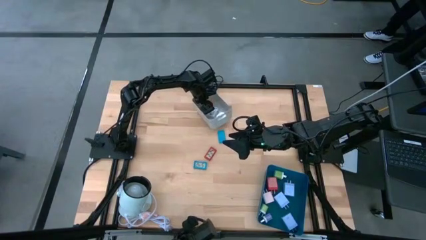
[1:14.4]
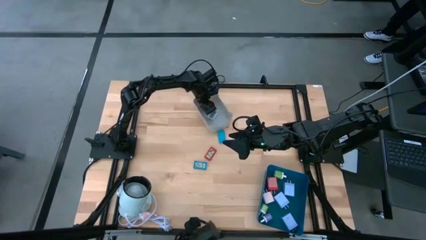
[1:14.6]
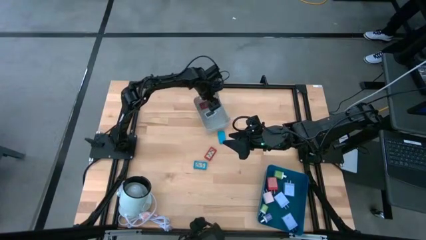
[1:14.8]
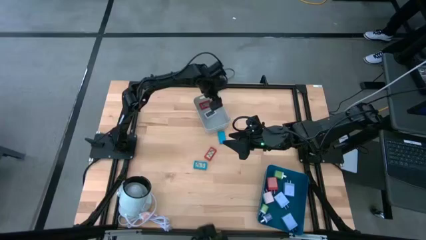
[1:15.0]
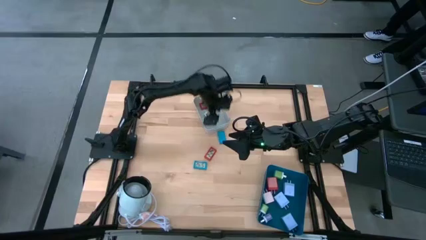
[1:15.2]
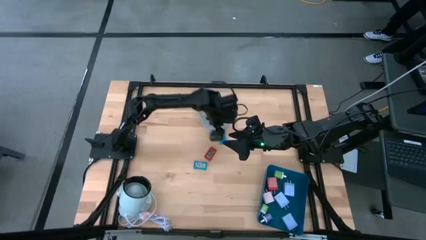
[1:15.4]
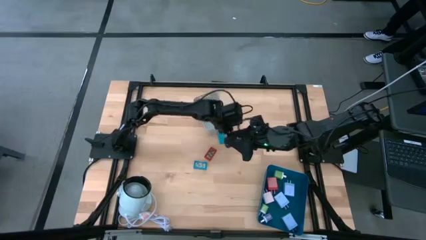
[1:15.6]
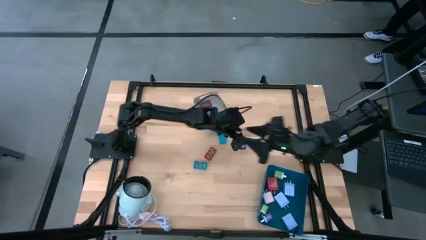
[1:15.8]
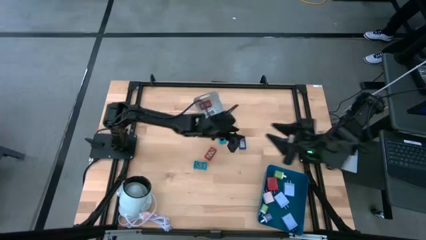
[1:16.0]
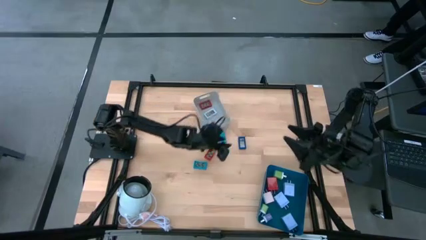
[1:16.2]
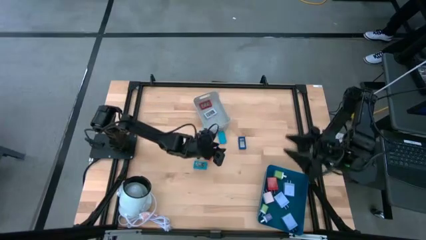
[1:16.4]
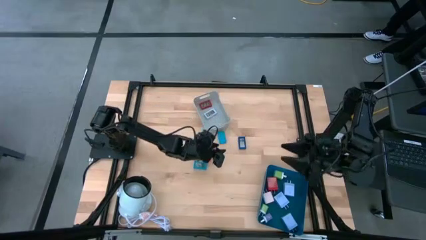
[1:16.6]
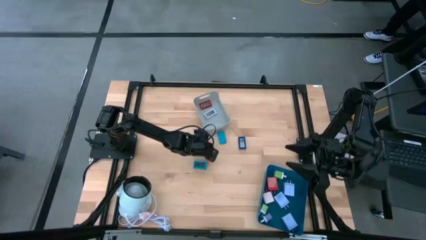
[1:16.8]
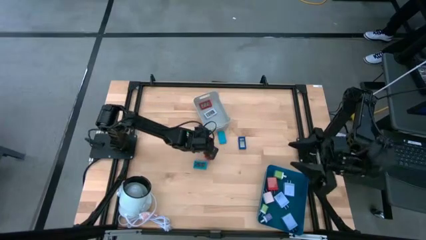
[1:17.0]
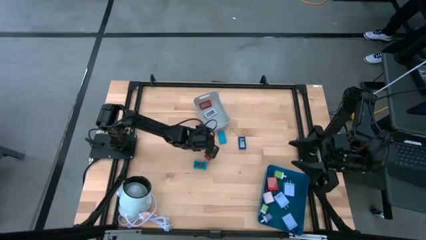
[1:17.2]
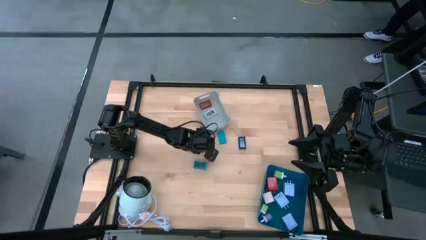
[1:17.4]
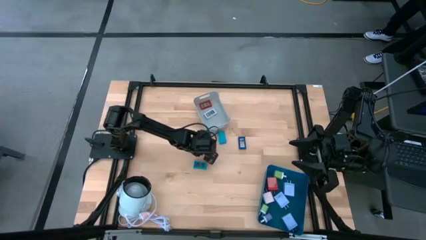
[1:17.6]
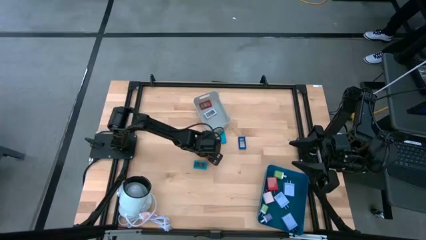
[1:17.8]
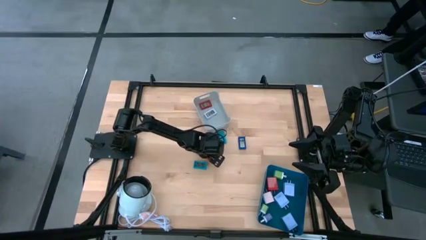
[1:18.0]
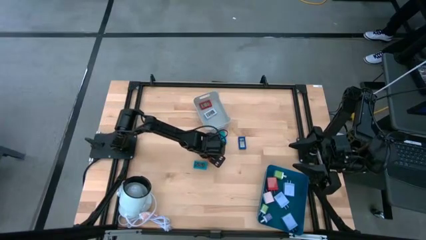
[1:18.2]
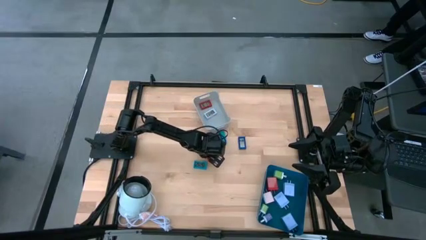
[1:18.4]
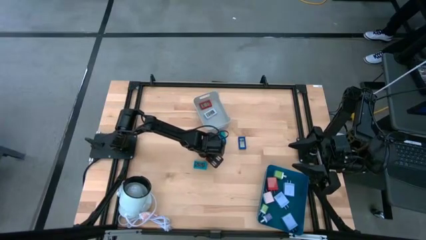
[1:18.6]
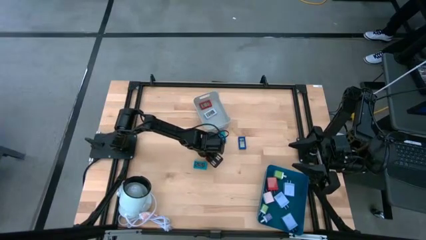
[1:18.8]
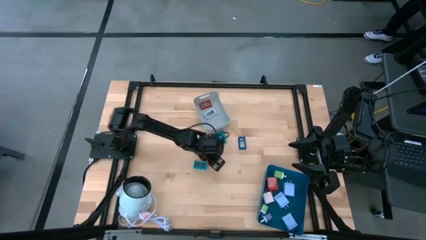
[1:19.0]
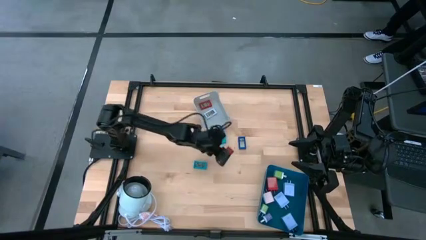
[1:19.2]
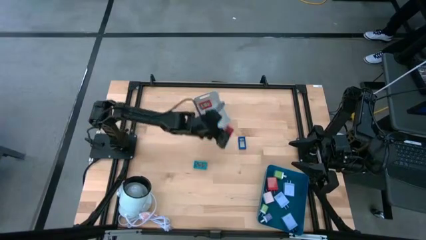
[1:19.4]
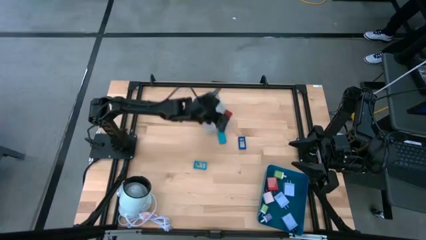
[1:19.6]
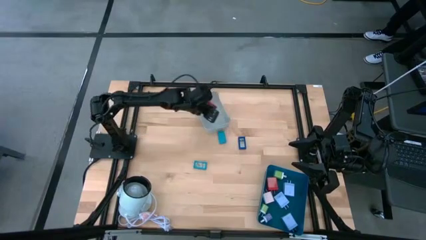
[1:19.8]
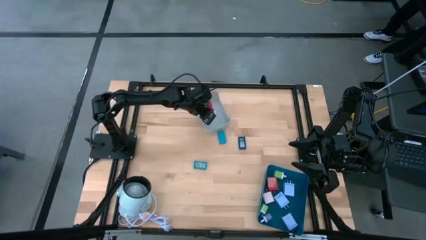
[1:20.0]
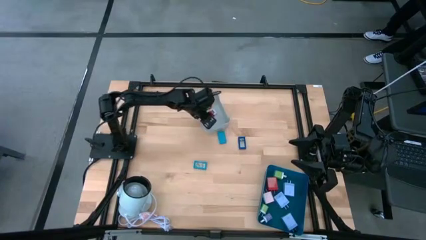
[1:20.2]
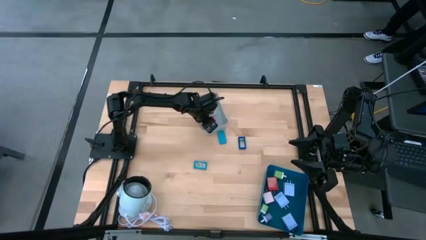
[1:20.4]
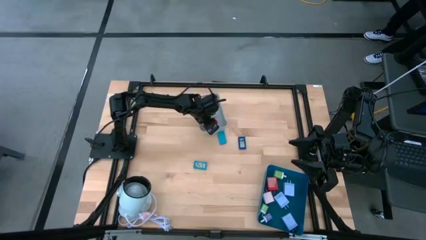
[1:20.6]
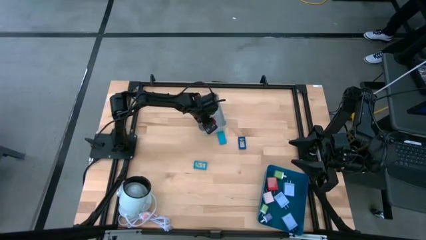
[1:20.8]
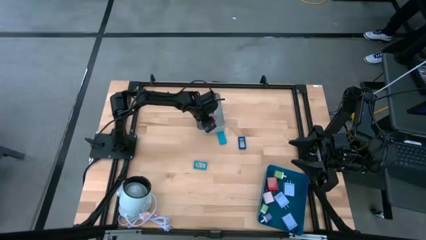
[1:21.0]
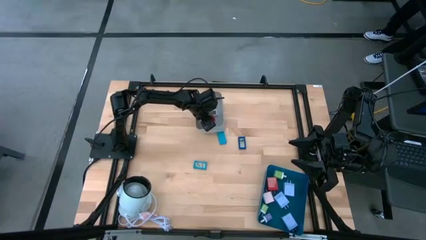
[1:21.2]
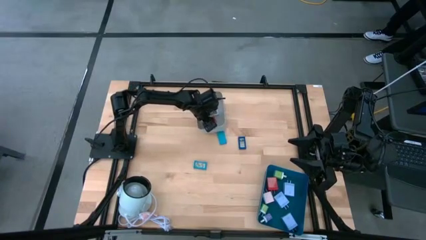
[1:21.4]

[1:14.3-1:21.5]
Task: Pick & Place Office items
Put the red digital clock into the gray bin

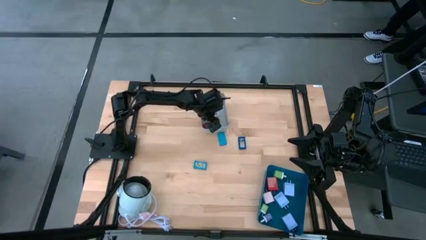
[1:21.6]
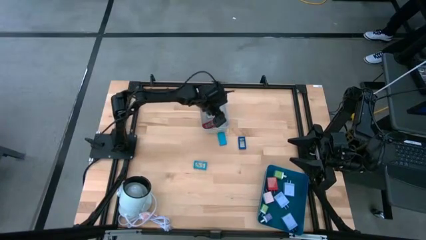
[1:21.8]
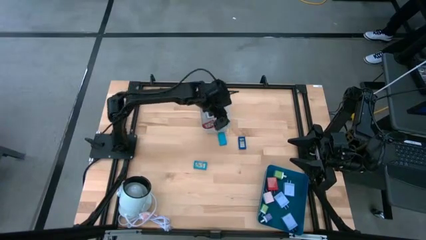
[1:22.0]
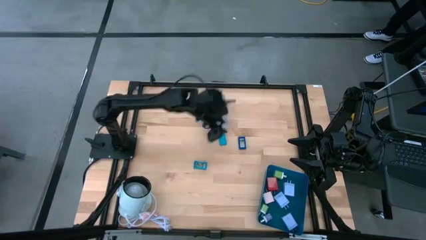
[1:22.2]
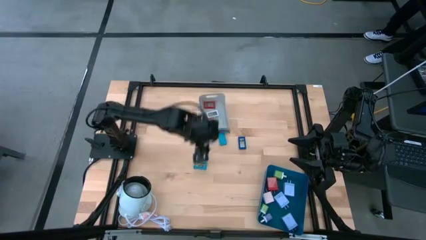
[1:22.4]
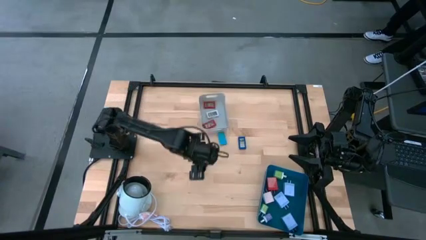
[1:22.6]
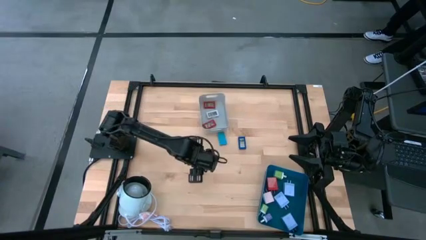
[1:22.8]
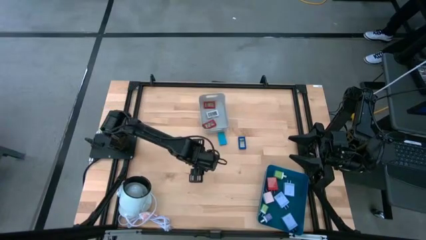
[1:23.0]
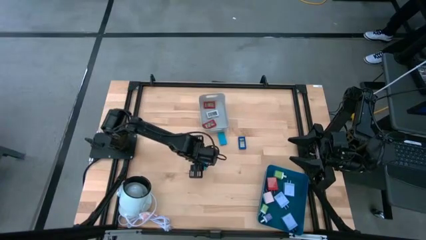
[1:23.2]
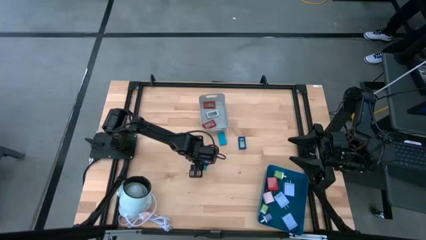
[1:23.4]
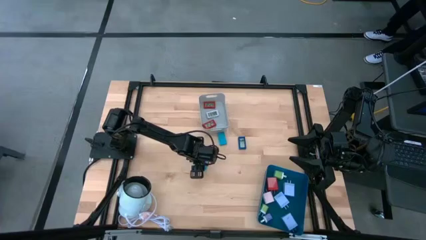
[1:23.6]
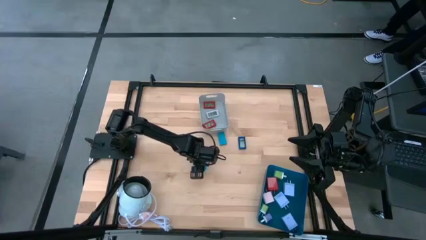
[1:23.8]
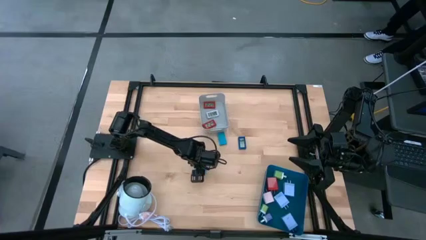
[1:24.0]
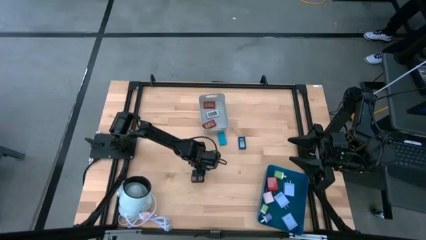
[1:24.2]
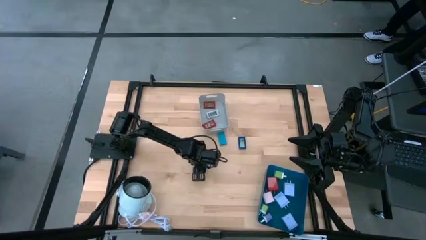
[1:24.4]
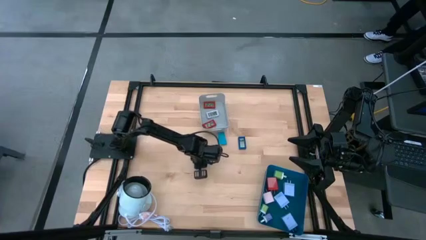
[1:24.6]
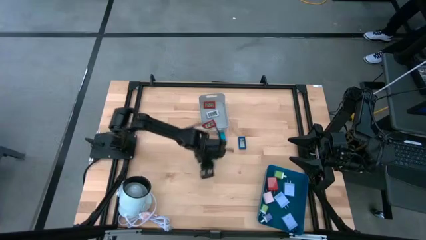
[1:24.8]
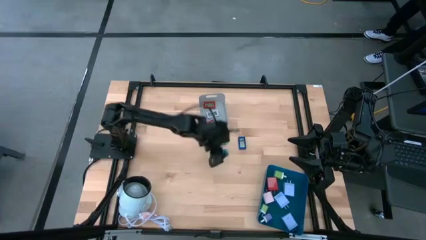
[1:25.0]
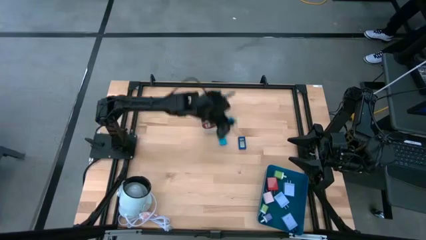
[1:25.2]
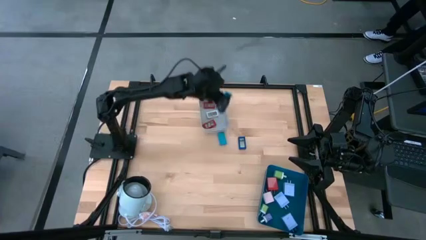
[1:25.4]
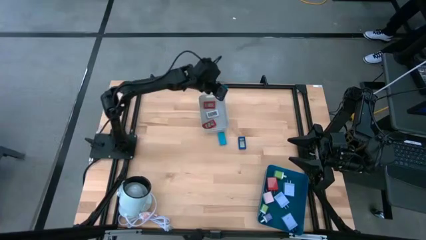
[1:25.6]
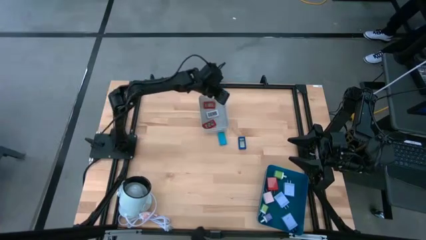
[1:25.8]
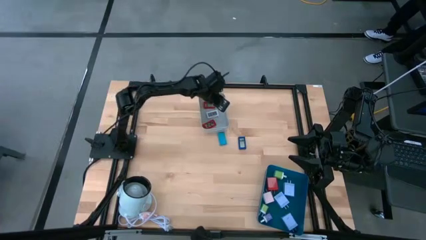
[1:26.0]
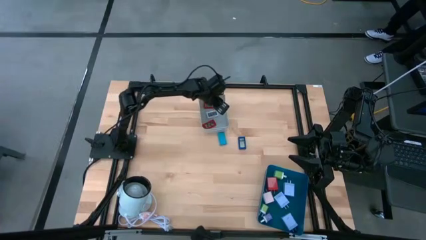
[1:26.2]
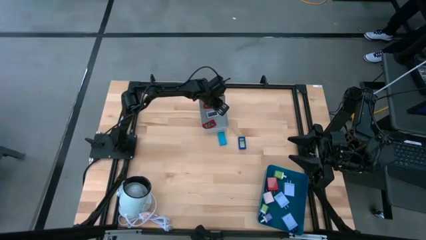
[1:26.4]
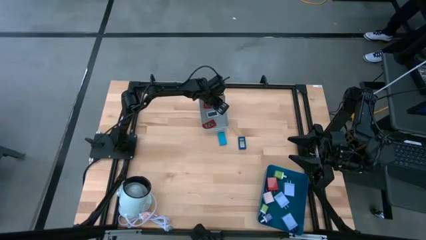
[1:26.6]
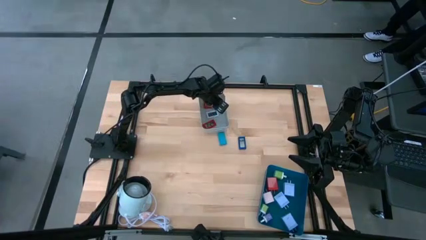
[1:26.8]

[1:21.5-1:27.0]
Put the bottom light blue digital clock into the gray bin

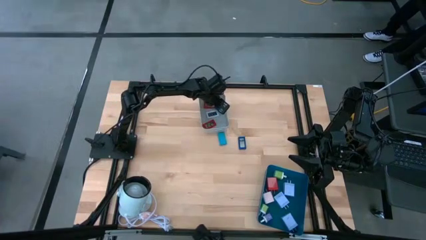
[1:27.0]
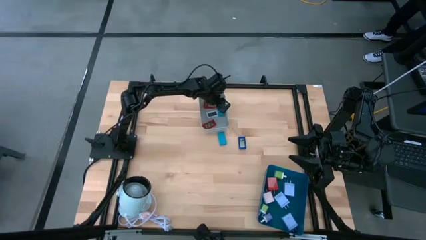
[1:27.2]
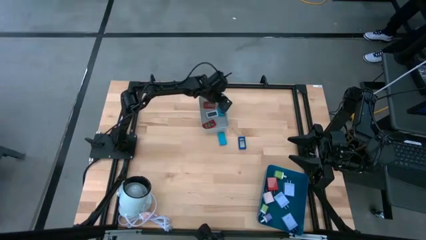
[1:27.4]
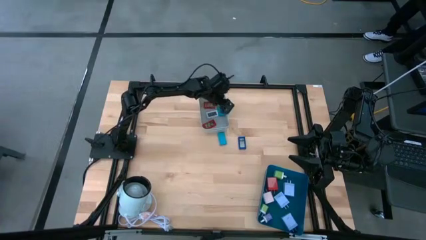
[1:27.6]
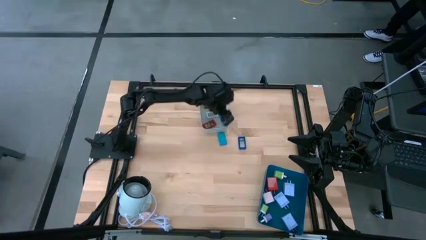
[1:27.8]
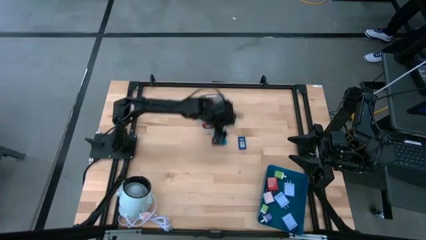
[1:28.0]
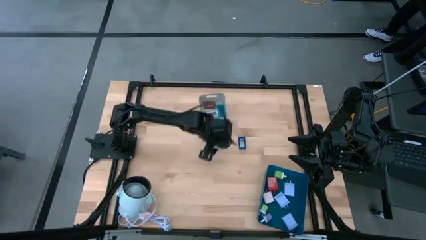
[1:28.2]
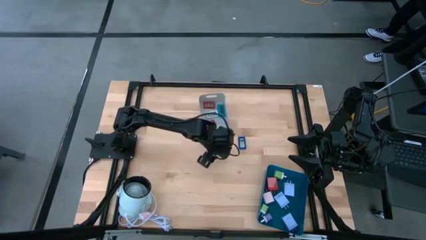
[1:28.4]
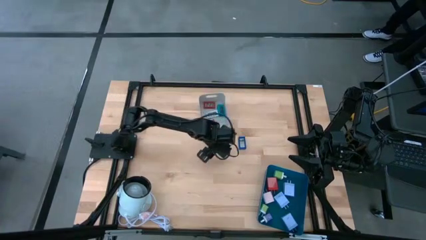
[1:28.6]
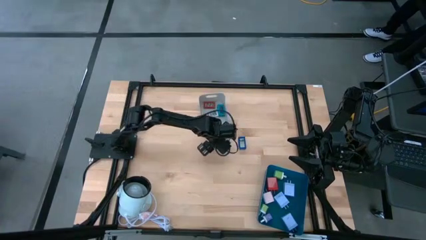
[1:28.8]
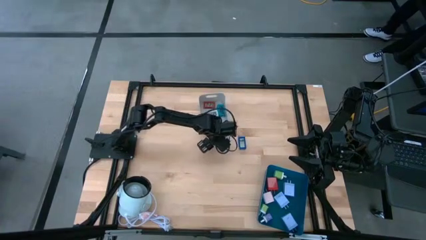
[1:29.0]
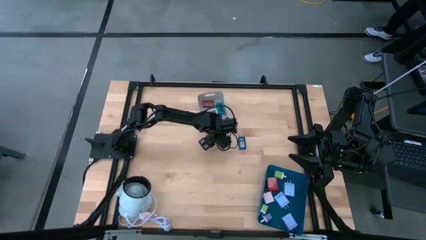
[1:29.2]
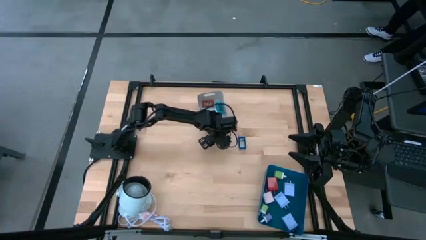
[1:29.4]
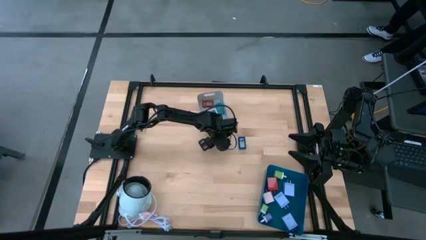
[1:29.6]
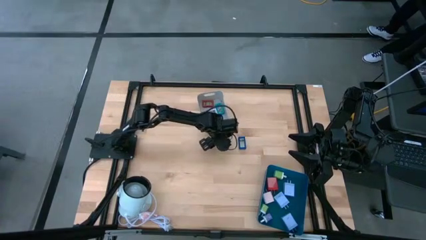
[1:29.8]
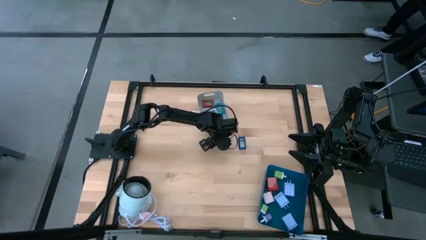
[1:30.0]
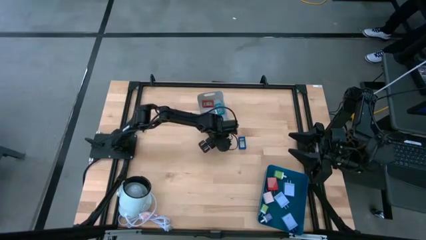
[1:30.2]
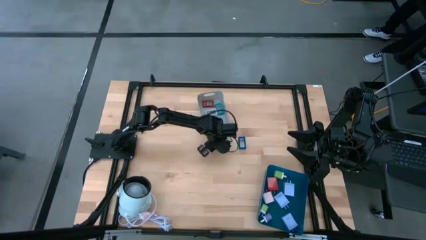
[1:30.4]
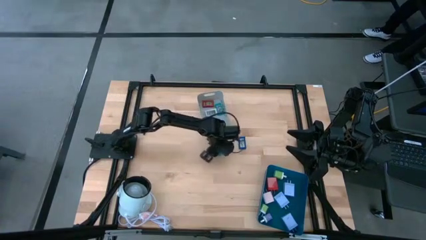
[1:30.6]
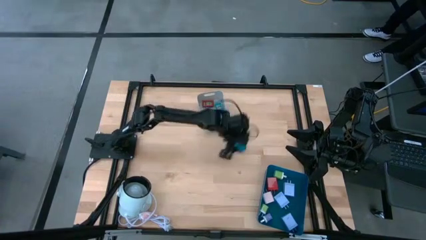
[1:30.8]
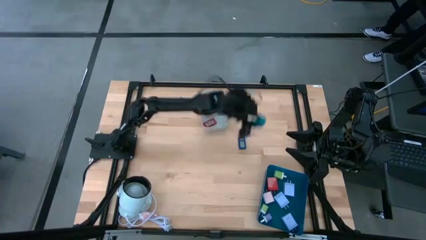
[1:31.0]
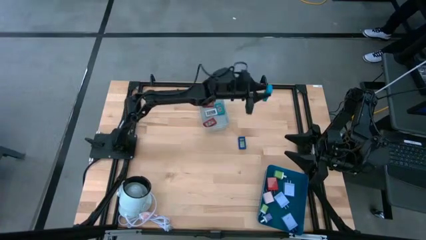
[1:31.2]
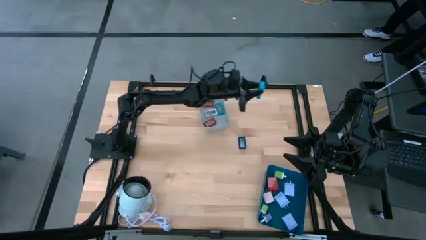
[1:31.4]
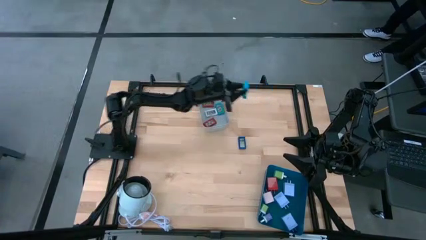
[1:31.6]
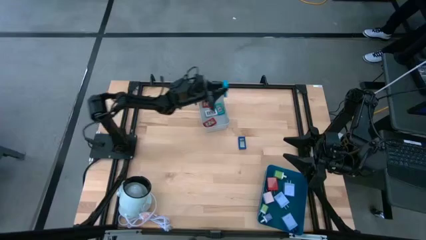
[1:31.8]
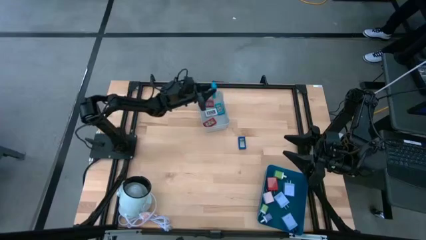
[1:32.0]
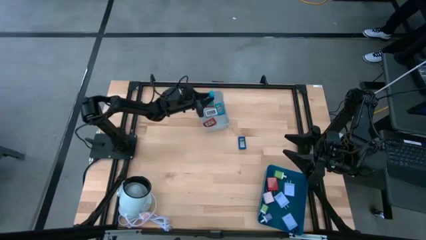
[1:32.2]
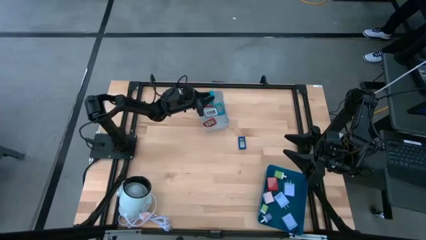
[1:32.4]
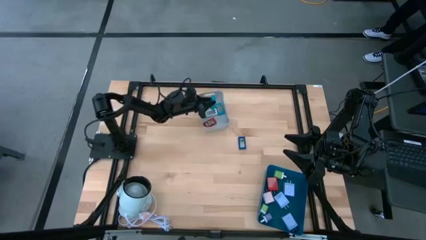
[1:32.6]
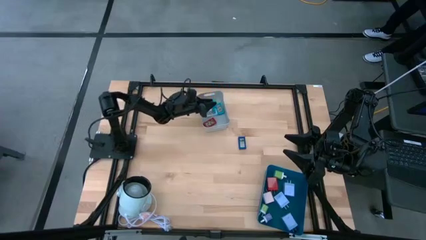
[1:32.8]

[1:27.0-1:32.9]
Put the light blue digital clock into the gray bin
